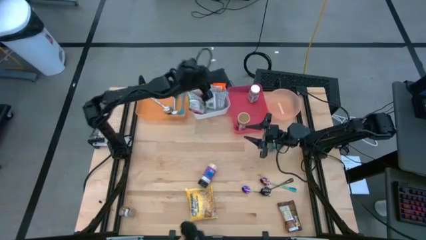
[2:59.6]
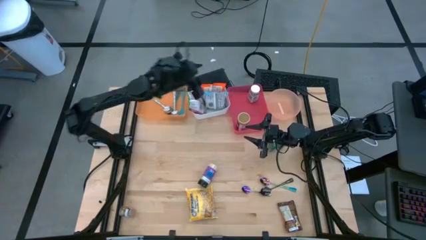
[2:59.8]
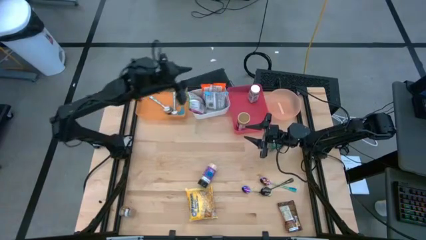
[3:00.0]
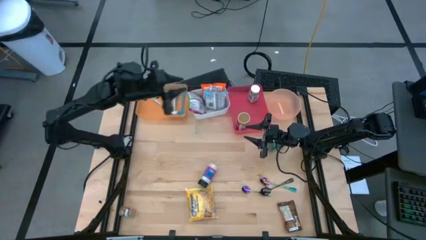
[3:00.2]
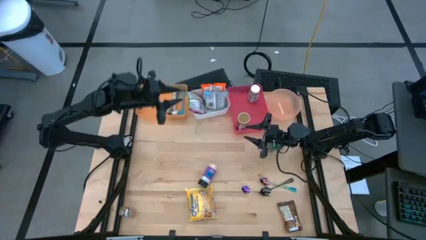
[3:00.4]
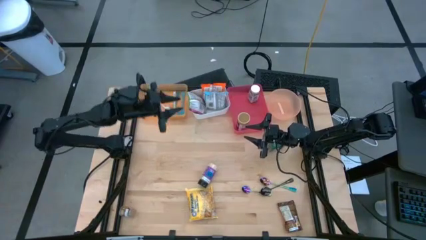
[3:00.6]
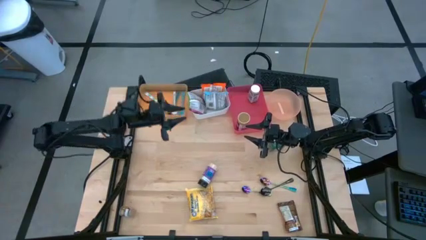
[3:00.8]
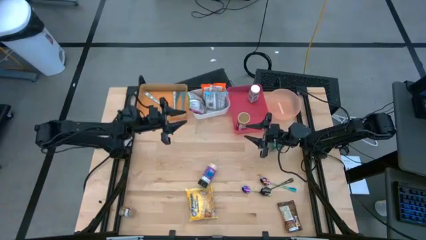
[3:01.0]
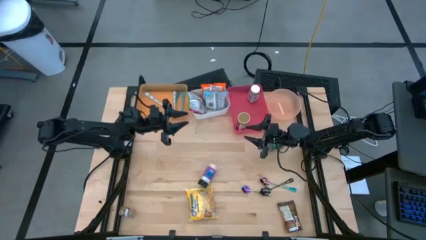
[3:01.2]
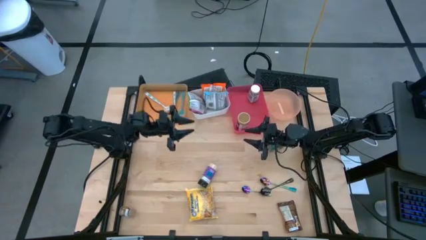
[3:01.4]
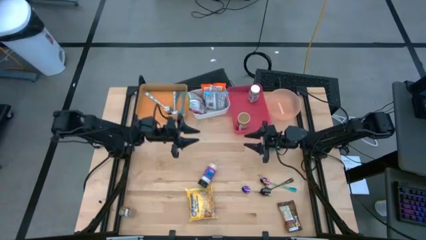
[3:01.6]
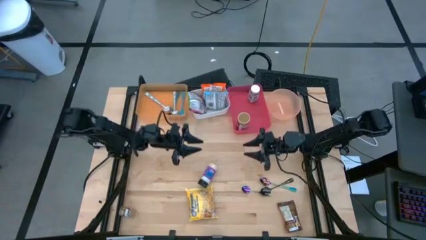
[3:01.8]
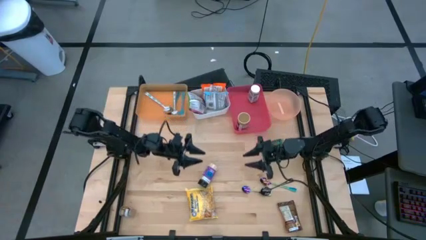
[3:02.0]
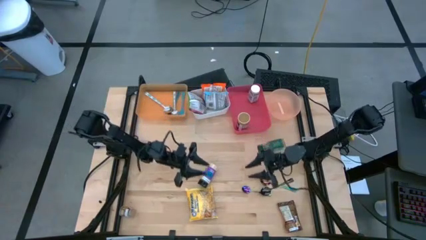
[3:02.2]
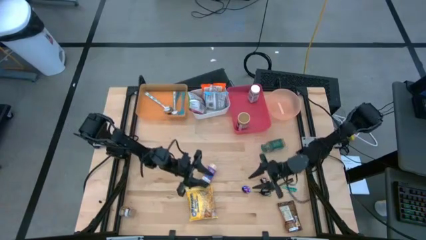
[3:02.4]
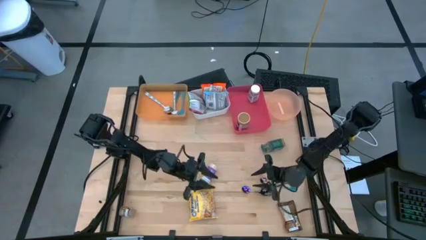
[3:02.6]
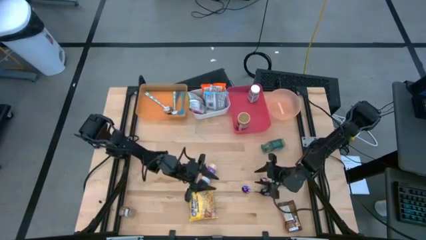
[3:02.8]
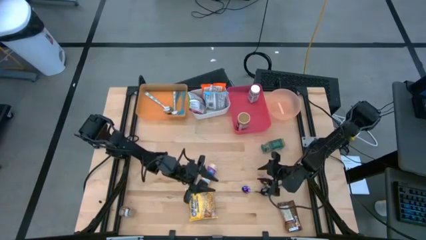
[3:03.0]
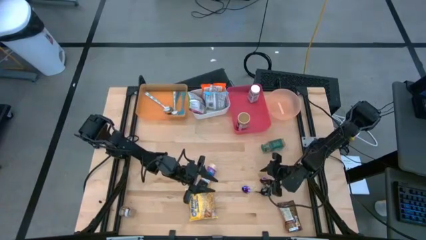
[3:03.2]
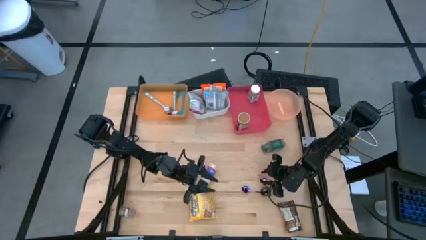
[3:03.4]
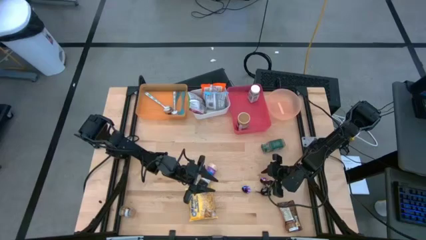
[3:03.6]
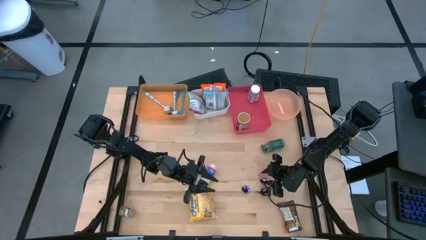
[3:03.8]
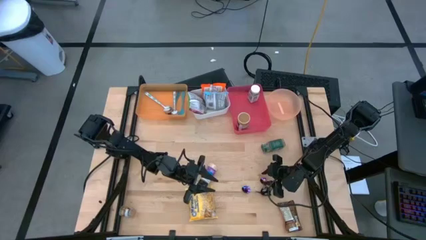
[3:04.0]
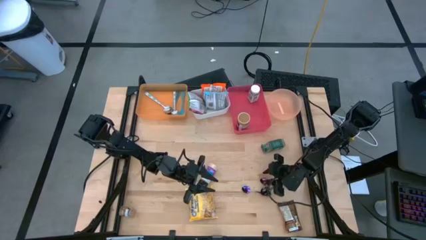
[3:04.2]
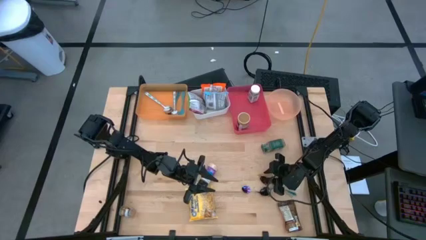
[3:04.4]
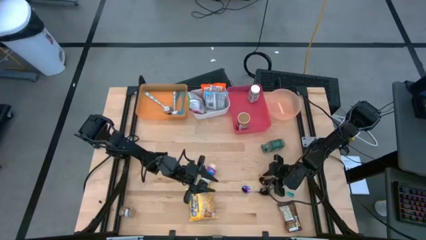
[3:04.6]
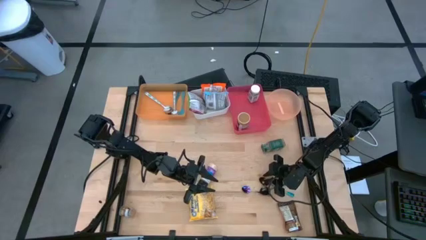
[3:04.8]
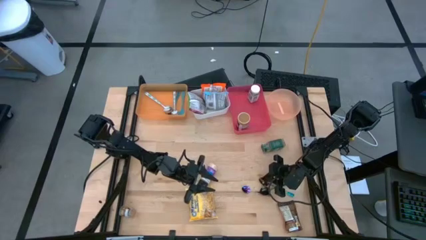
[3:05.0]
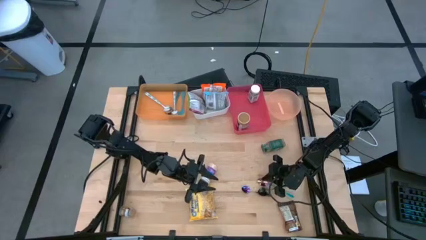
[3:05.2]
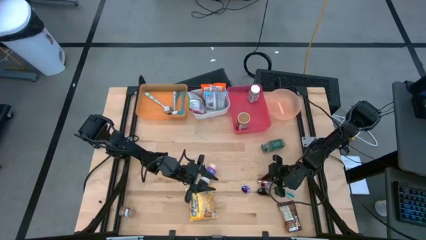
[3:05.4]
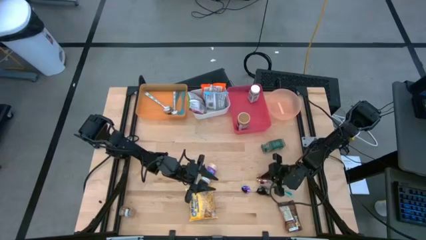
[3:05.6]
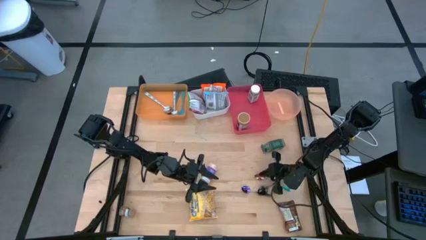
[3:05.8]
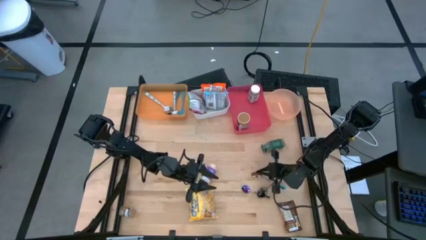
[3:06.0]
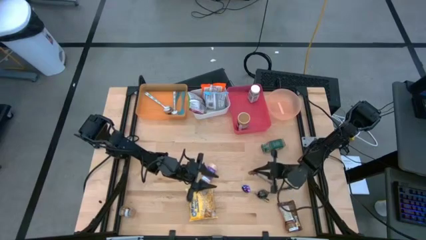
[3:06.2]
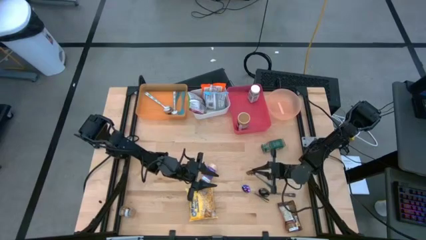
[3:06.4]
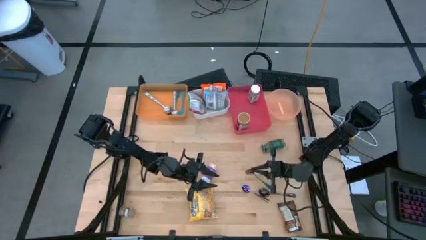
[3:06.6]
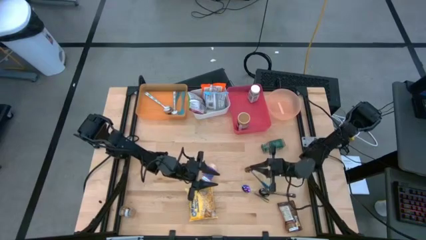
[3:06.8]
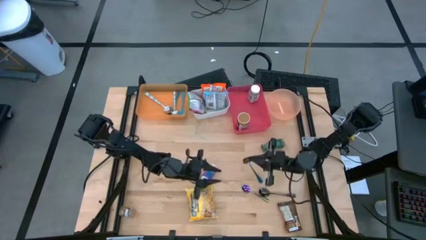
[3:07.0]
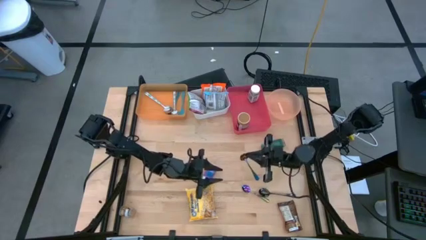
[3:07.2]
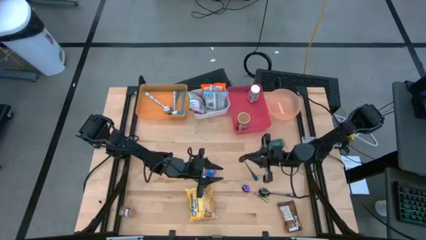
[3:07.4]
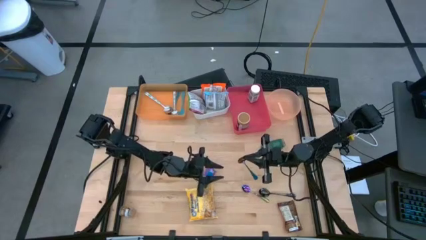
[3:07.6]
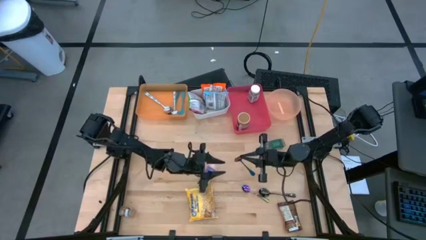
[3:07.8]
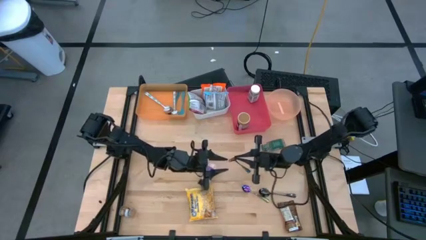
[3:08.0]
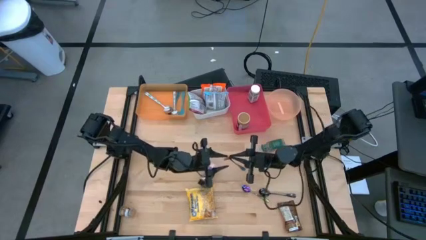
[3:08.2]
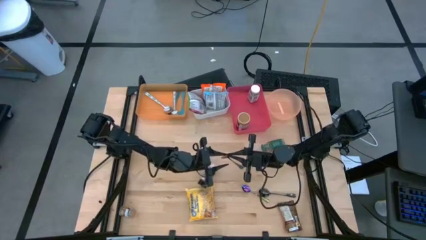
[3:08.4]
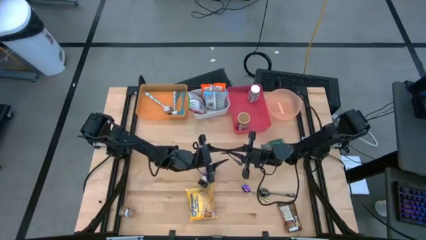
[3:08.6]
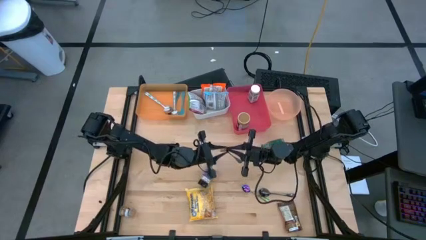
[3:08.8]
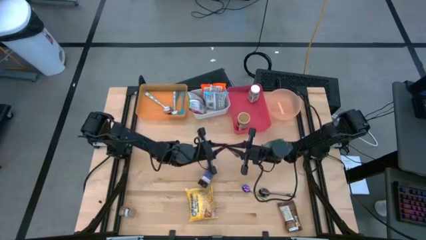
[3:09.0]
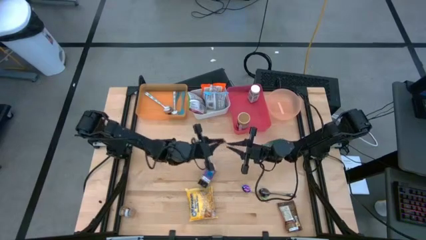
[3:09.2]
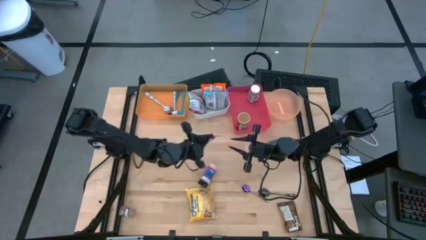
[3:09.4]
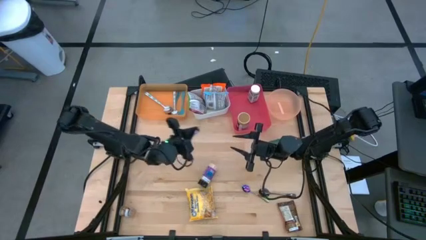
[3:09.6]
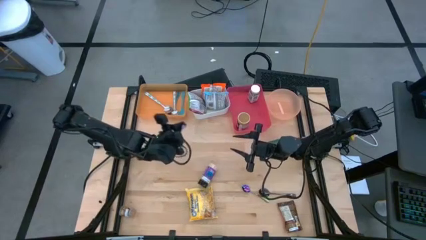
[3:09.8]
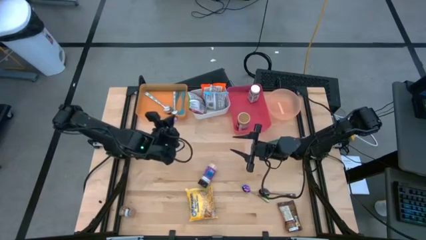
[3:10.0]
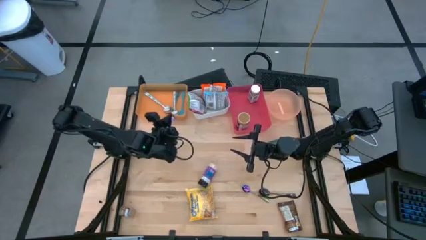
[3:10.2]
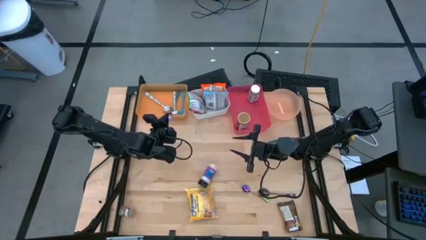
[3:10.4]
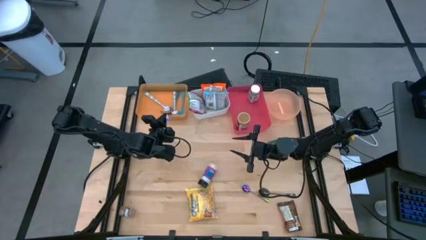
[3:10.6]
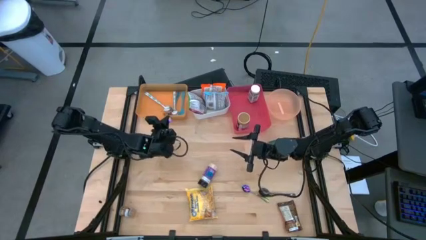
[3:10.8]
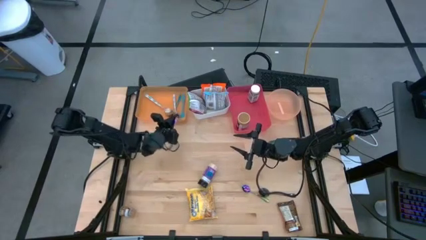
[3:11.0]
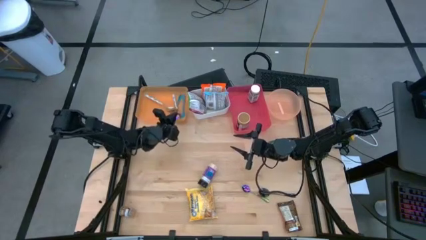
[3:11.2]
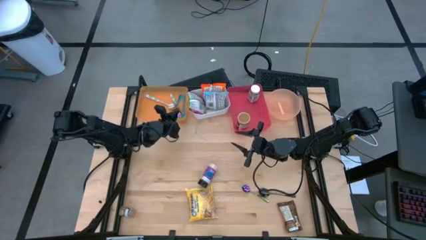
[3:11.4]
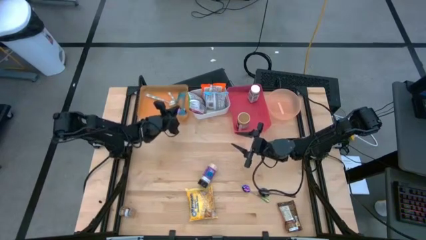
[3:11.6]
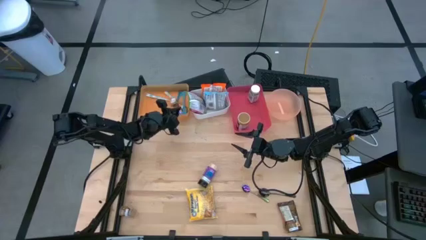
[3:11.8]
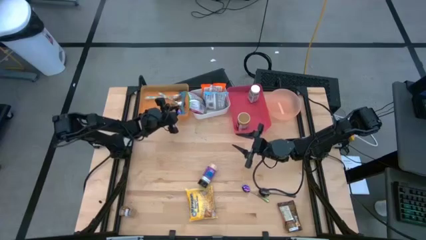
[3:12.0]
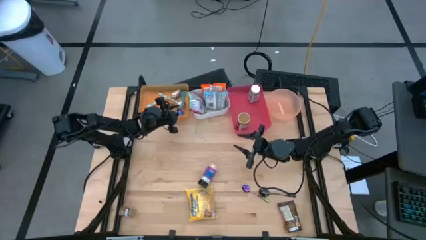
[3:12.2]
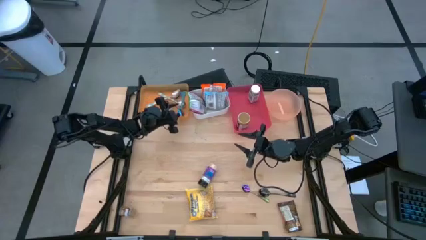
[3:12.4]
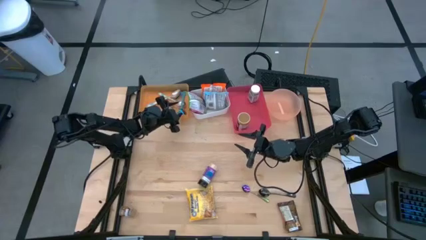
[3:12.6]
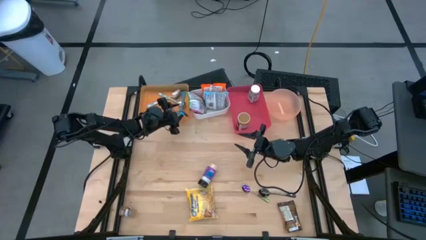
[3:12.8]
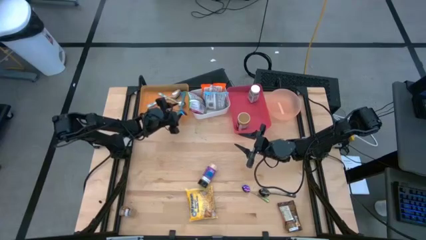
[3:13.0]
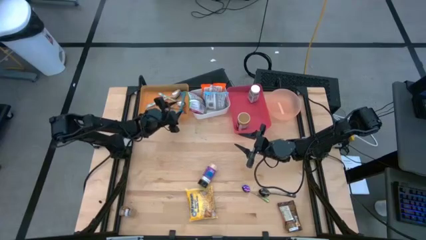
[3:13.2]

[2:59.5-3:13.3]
Task: Pick & Place Food Item
Put the right purple spoon into the orange bin
